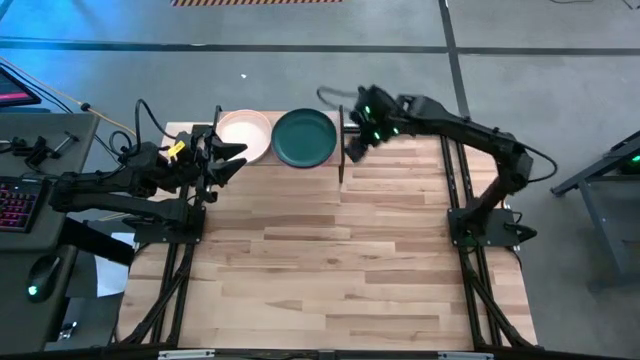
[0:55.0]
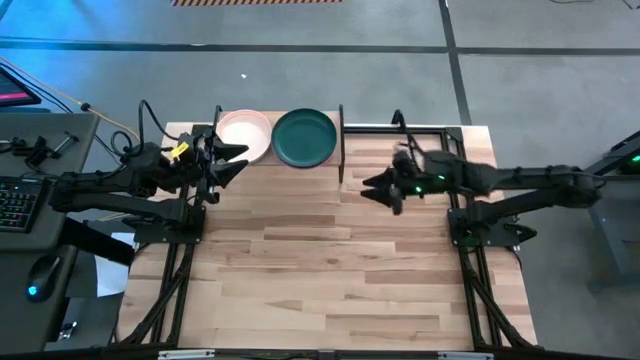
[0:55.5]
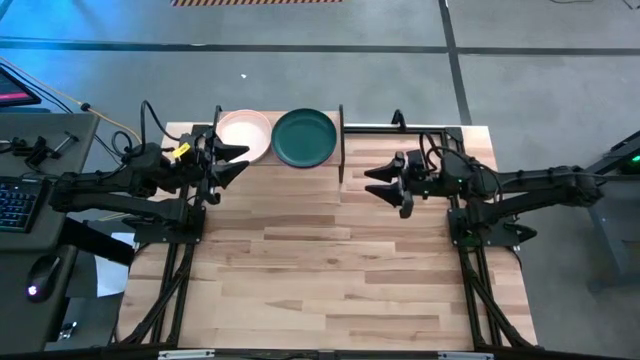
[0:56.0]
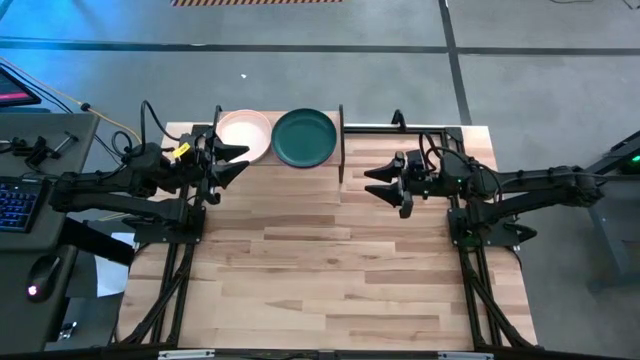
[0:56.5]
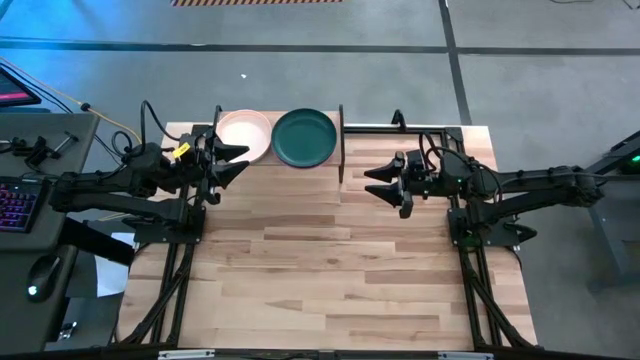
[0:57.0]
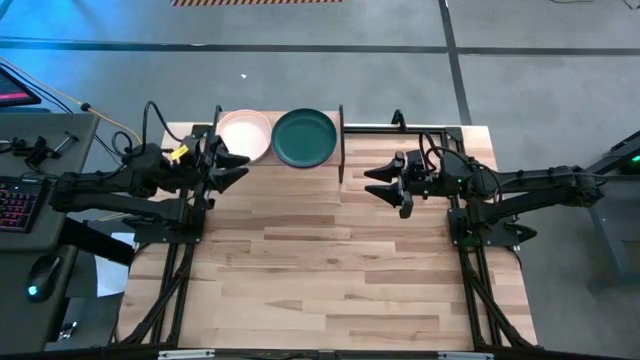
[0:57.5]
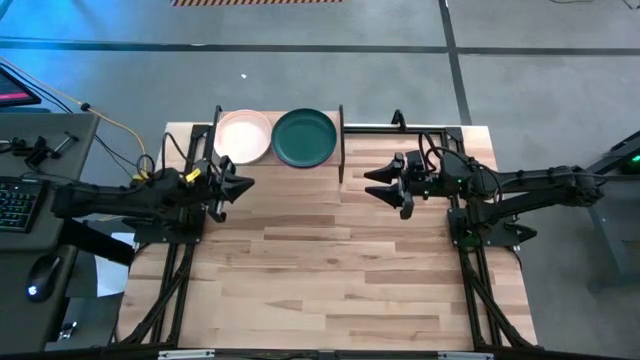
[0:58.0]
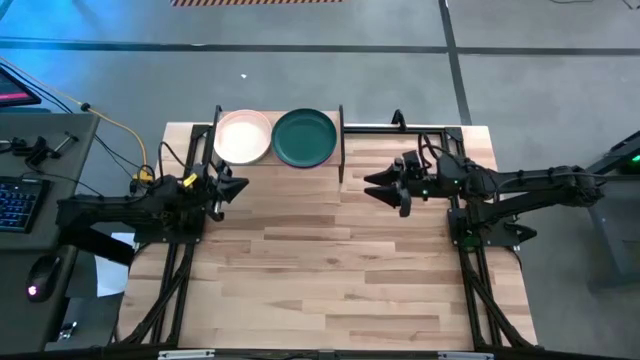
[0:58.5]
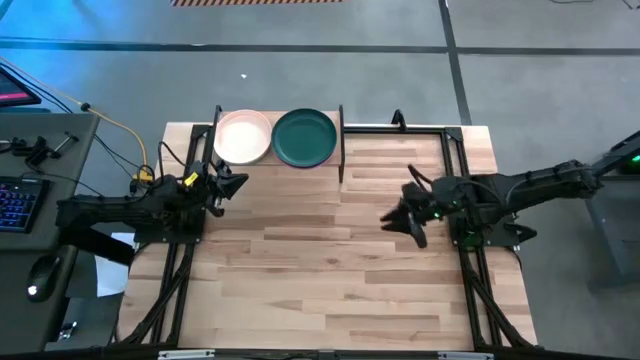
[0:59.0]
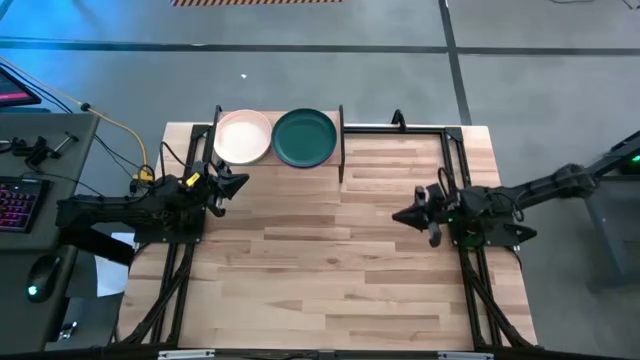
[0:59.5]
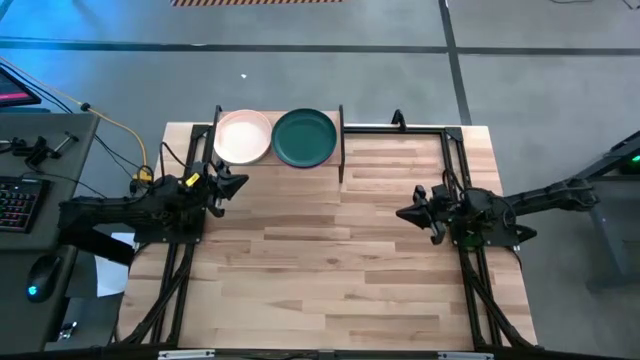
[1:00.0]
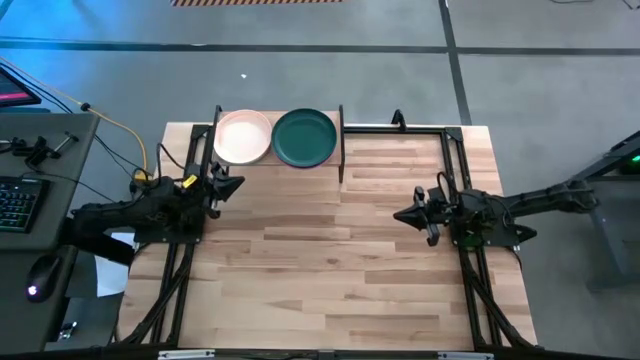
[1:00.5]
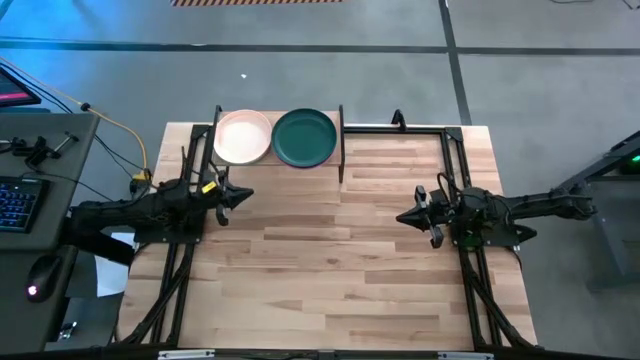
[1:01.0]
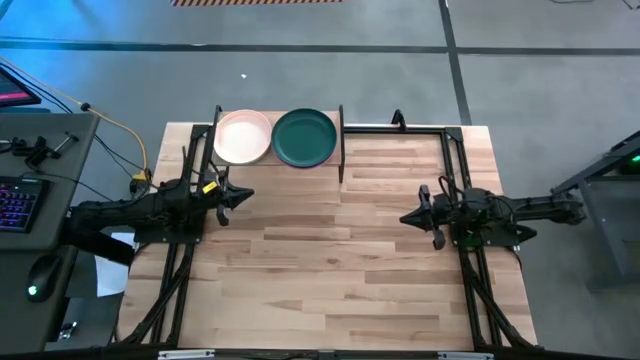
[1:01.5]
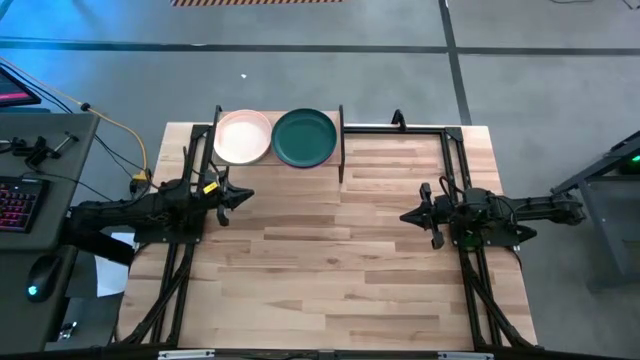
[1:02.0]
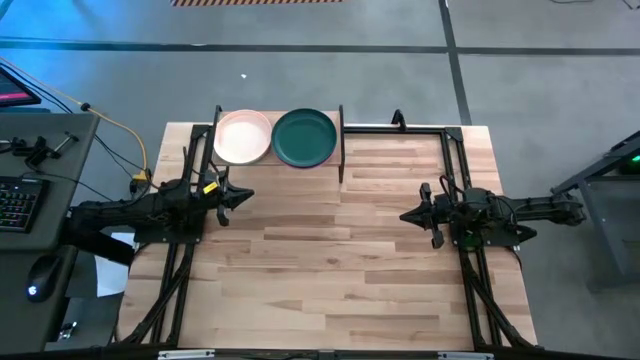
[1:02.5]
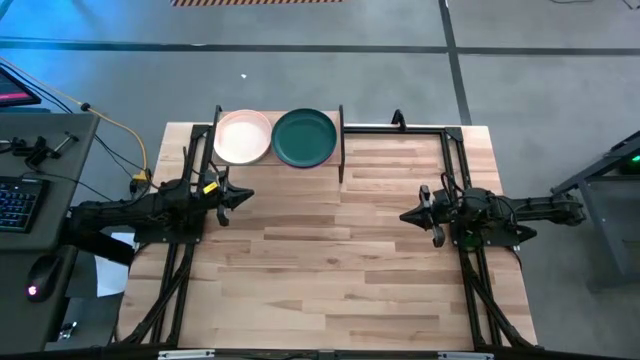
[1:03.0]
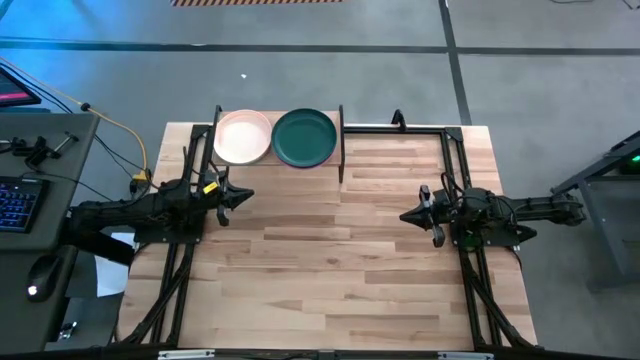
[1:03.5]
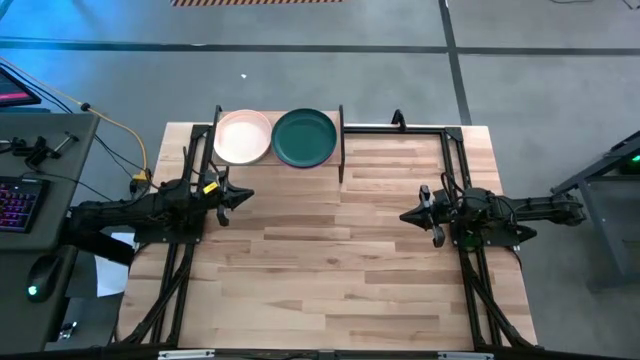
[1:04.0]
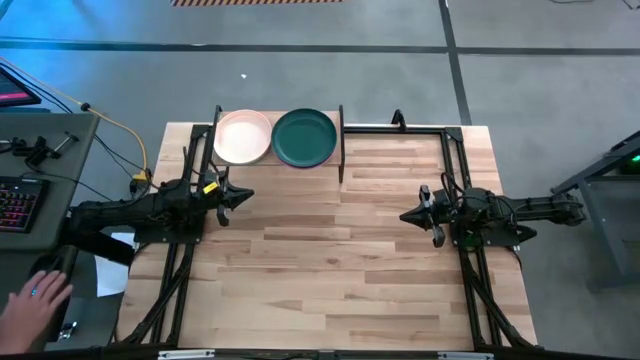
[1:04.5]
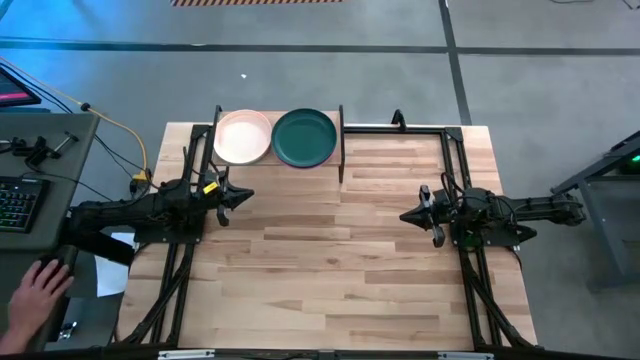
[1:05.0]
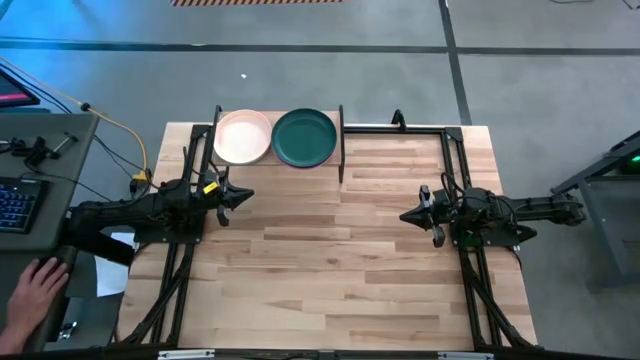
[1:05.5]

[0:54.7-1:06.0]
Task: Place and stack plates onto a shelf
Return to Home Position

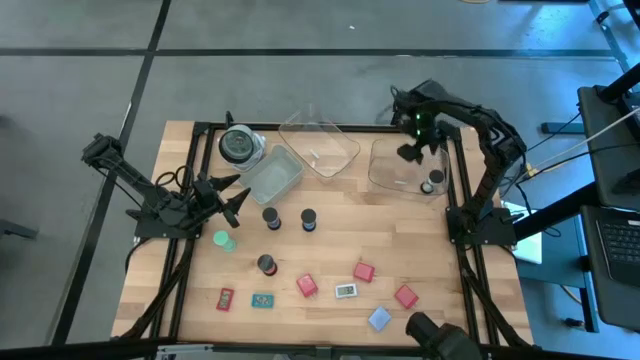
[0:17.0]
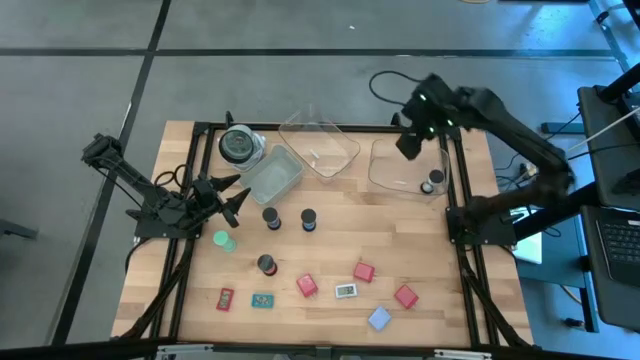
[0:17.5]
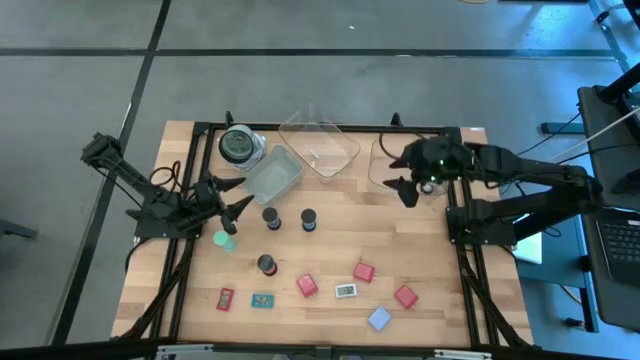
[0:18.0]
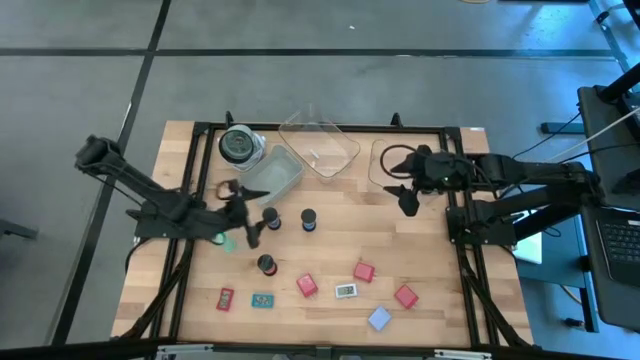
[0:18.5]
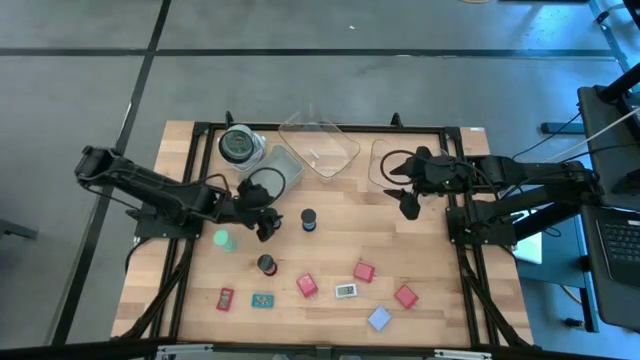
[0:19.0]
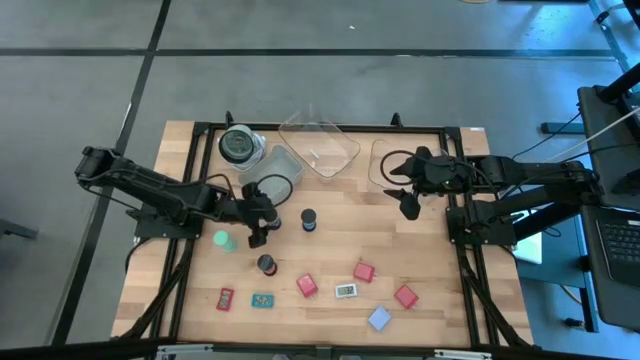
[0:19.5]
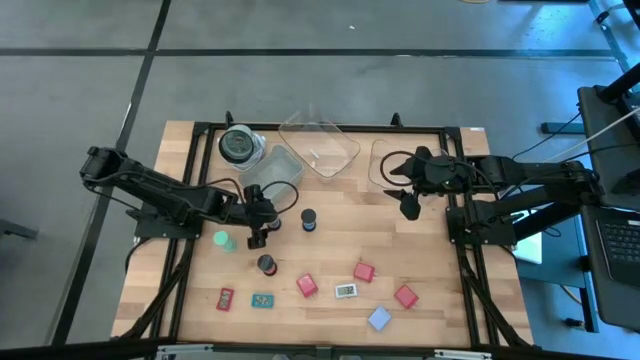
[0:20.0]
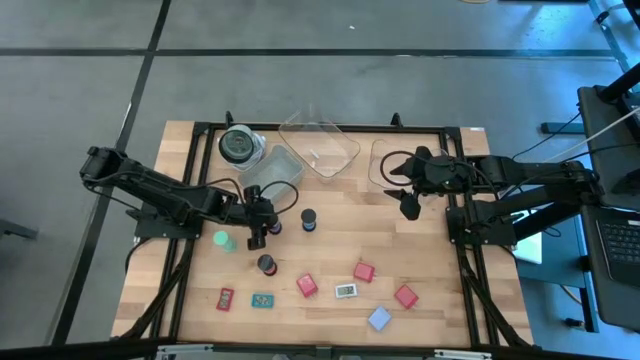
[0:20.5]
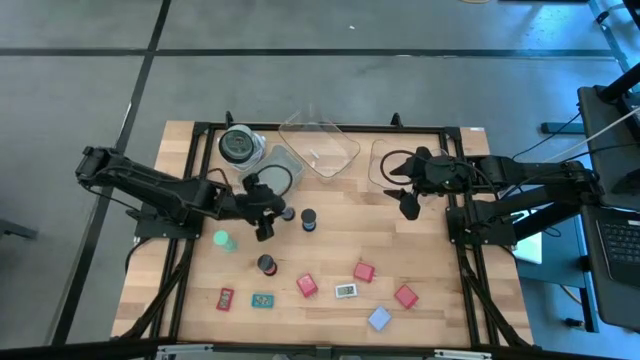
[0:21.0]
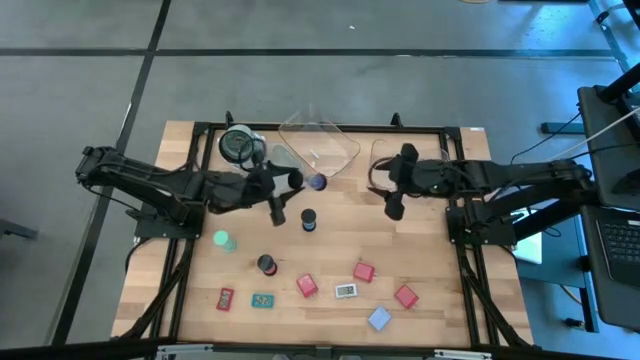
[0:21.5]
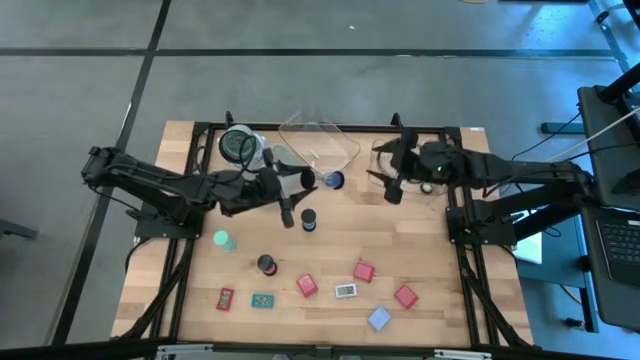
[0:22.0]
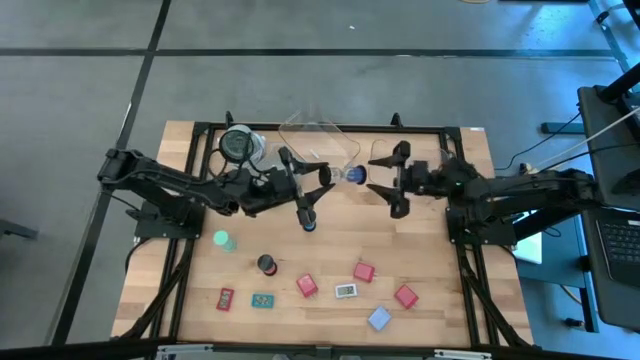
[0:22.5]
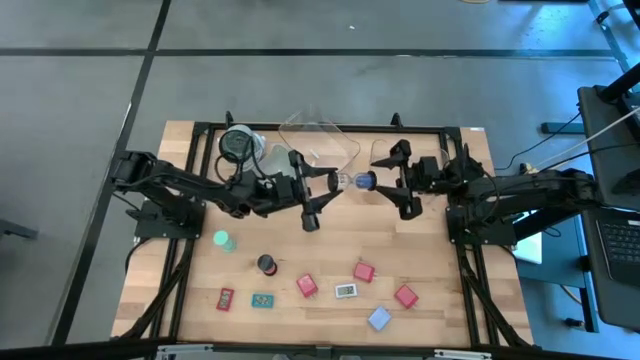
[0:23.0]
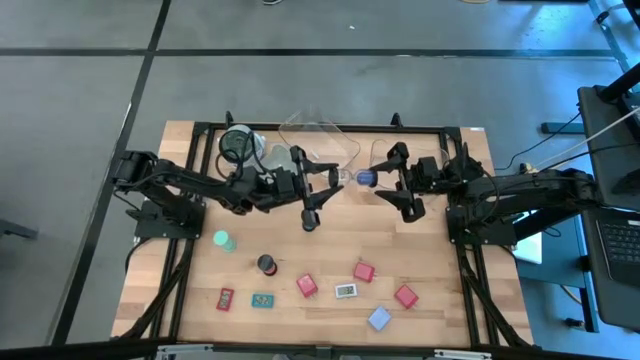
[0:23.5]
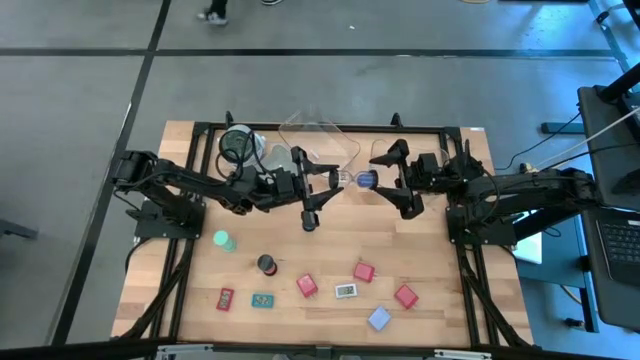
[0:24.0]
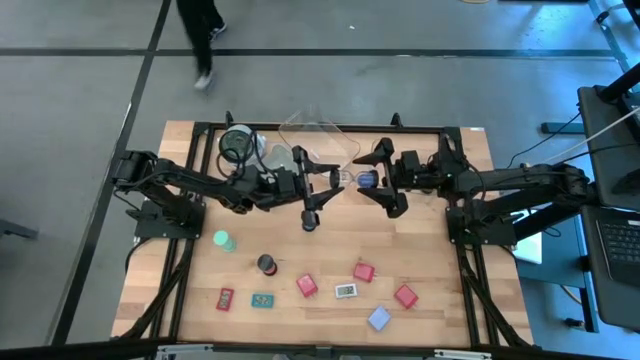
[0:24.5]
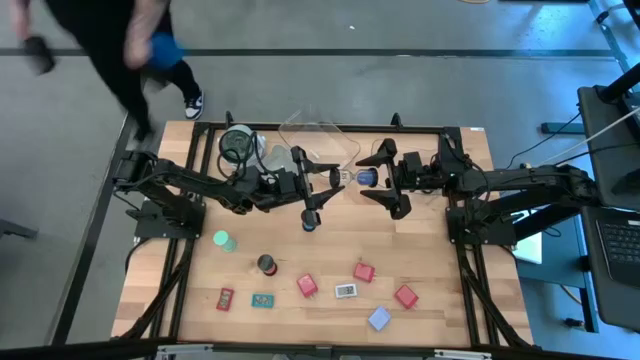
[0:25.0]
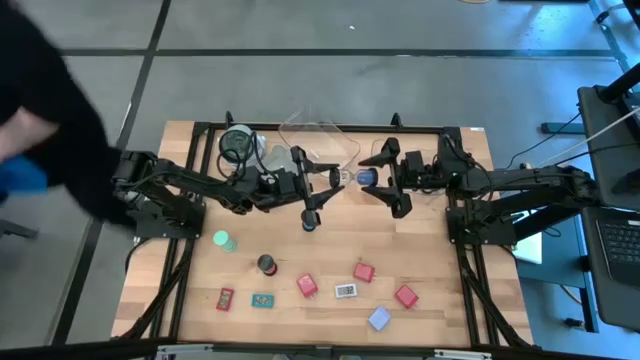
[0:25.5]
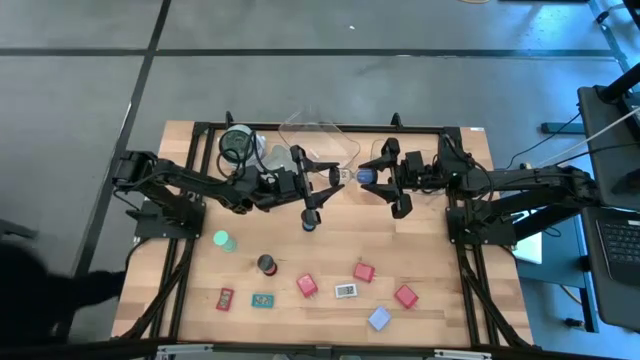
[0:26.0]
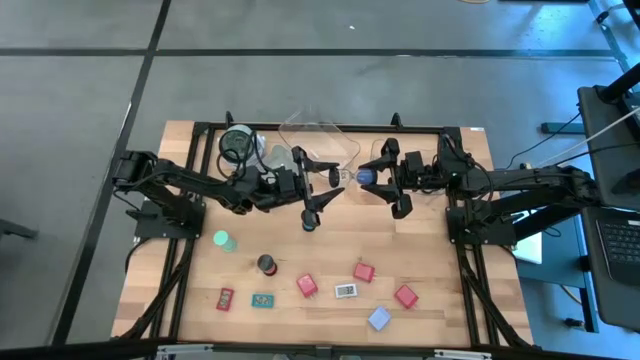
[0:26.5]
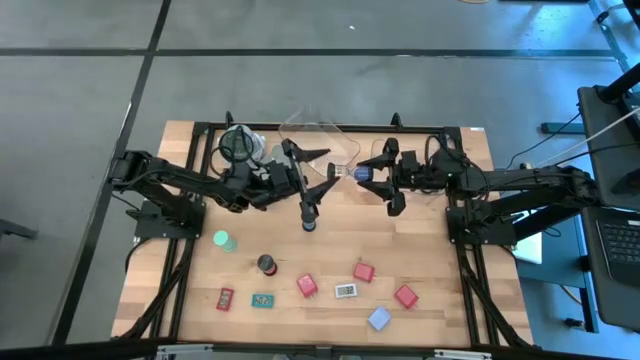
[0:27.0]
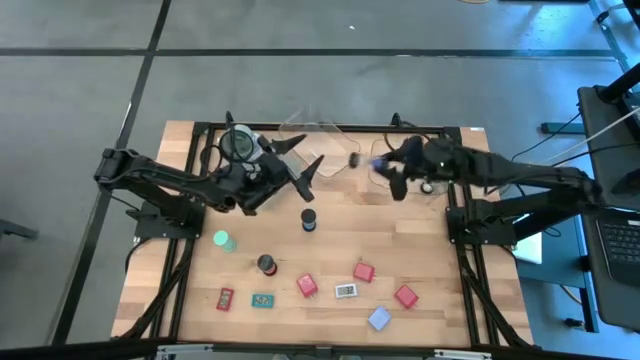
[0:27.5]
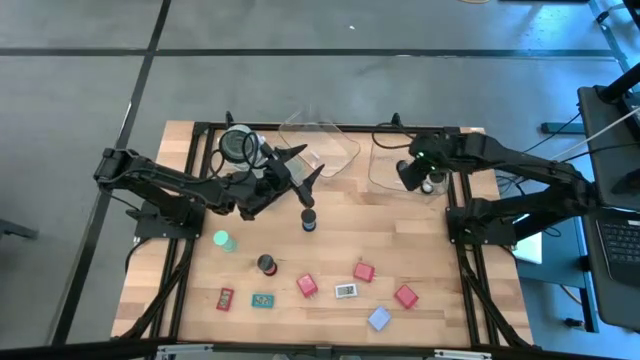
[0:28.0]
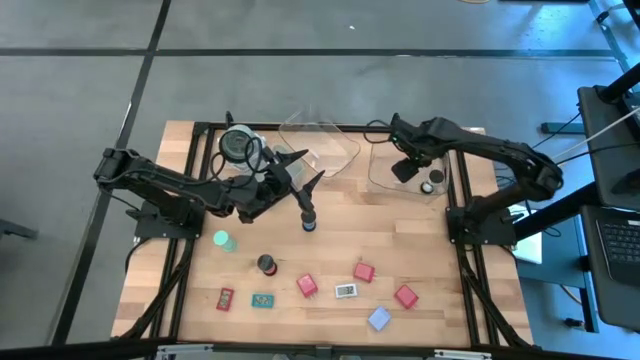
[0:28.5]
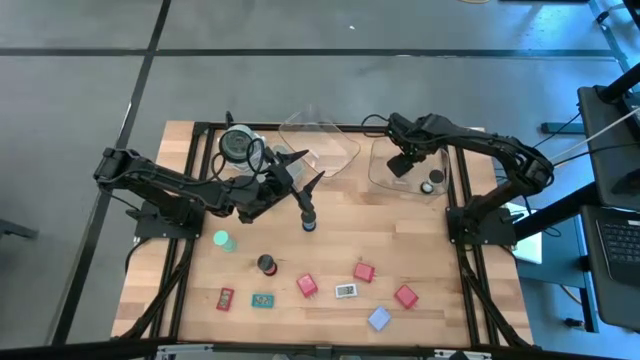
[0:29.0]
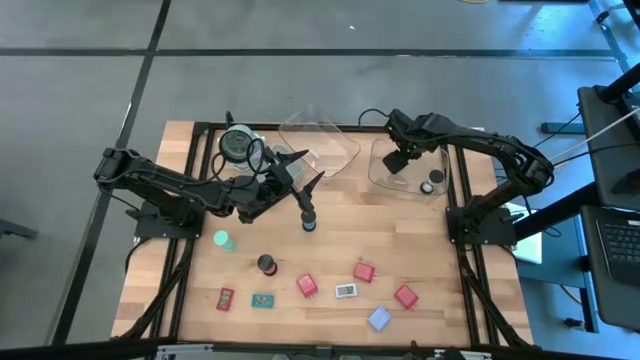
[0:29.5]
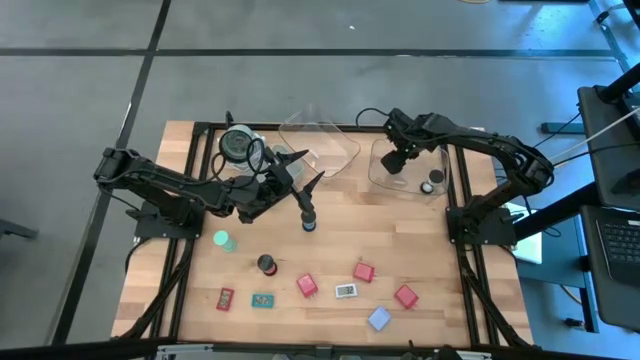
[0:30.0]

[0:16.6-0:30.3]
Task: Pick & Place Office items
Put the purple hourglass into the right transparent bin
